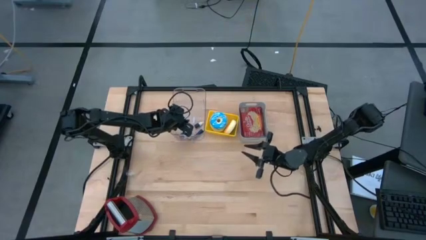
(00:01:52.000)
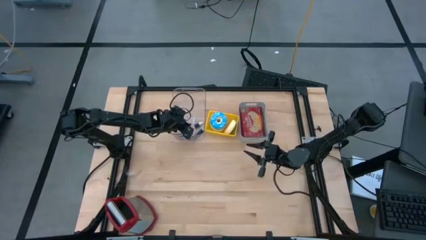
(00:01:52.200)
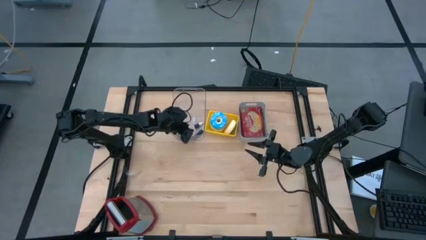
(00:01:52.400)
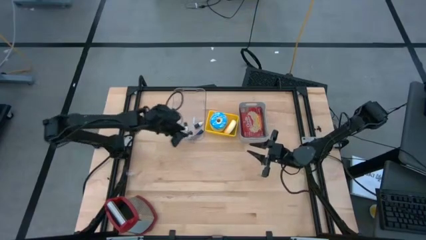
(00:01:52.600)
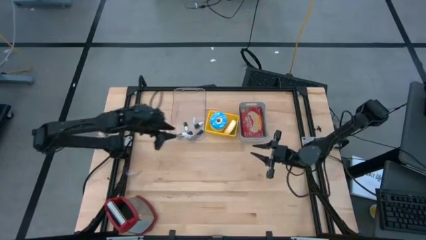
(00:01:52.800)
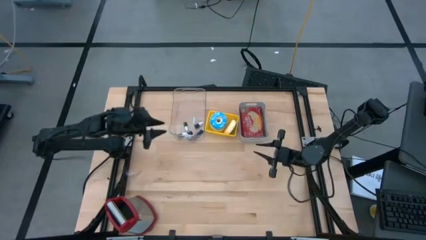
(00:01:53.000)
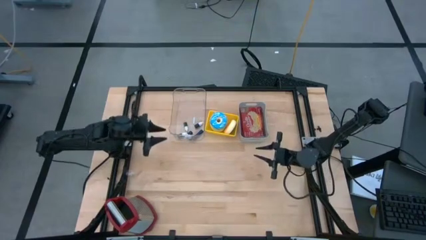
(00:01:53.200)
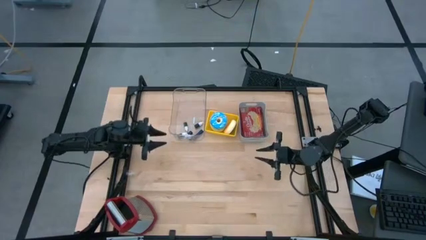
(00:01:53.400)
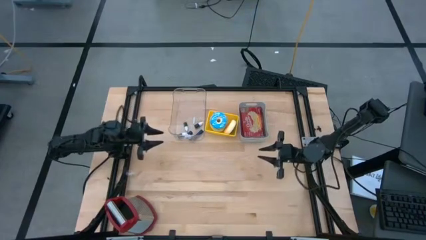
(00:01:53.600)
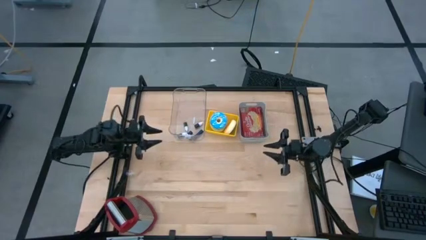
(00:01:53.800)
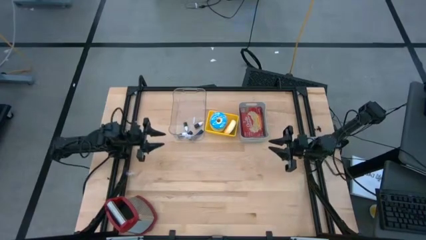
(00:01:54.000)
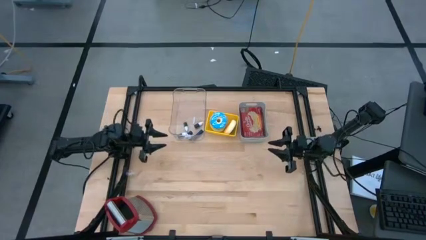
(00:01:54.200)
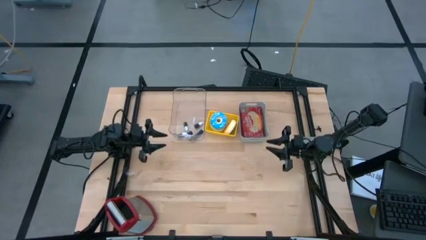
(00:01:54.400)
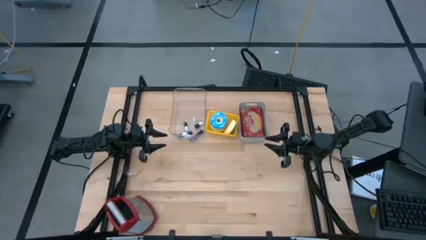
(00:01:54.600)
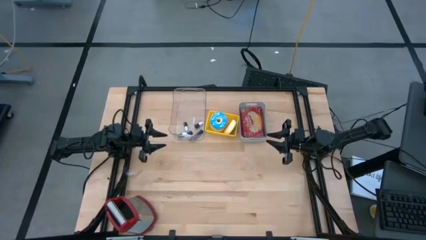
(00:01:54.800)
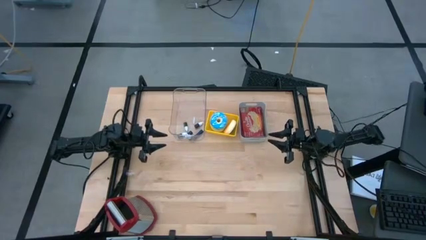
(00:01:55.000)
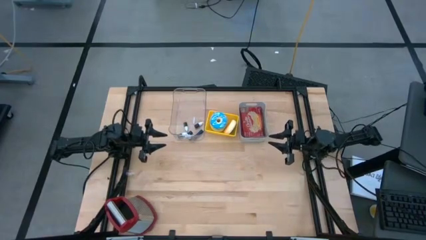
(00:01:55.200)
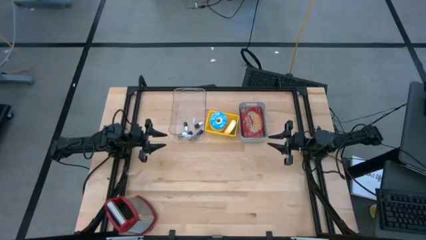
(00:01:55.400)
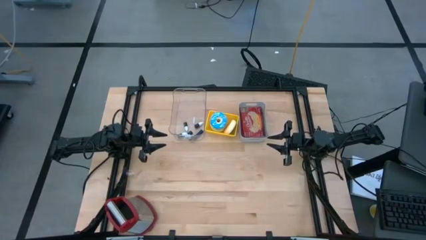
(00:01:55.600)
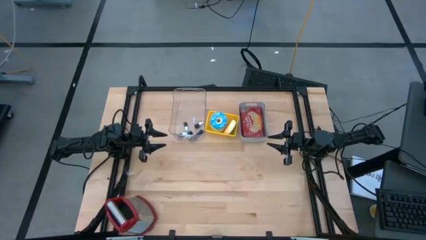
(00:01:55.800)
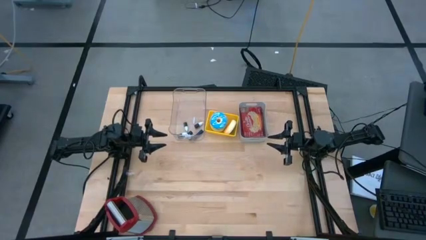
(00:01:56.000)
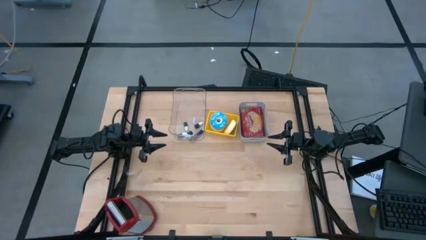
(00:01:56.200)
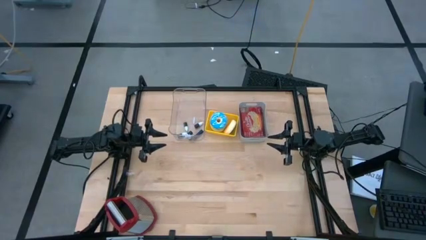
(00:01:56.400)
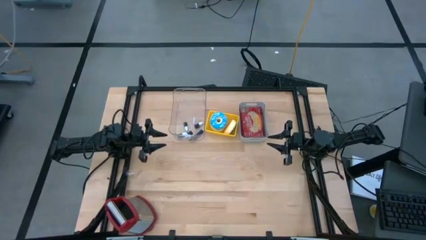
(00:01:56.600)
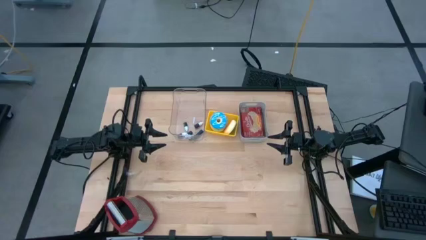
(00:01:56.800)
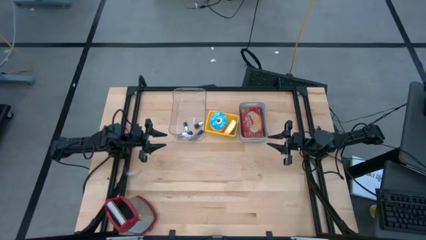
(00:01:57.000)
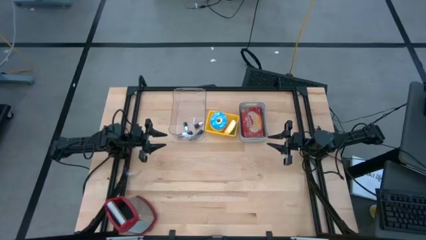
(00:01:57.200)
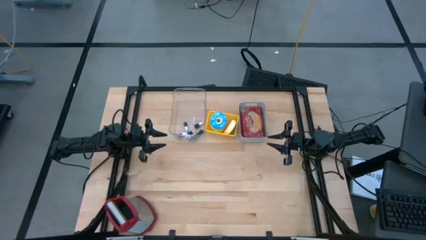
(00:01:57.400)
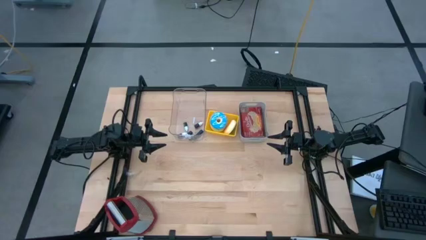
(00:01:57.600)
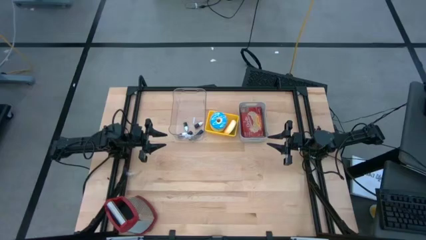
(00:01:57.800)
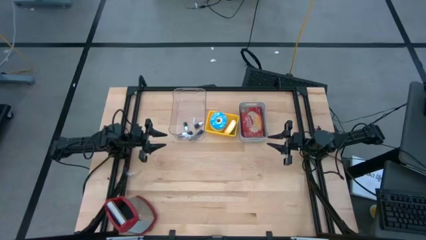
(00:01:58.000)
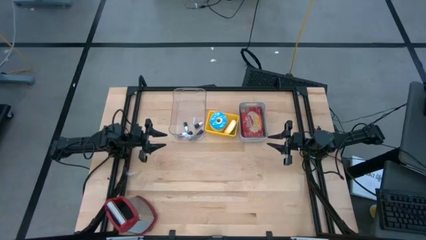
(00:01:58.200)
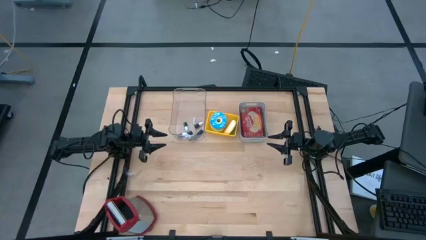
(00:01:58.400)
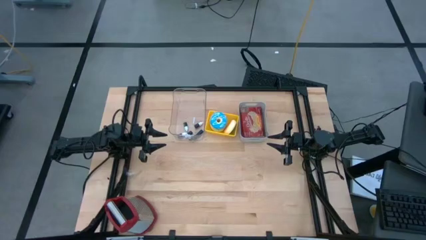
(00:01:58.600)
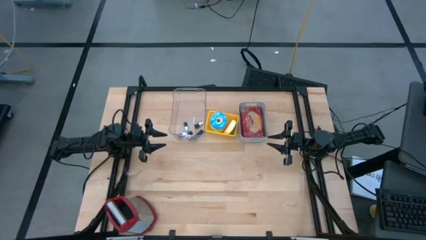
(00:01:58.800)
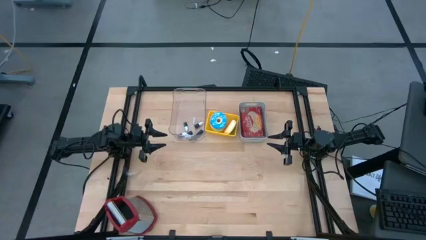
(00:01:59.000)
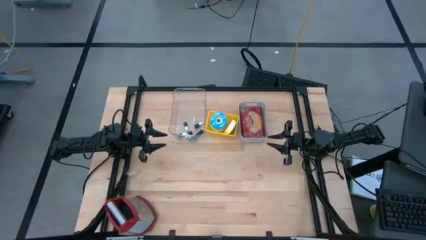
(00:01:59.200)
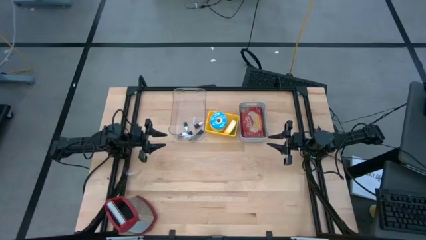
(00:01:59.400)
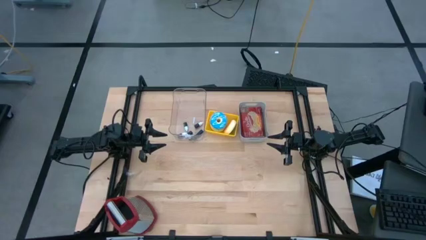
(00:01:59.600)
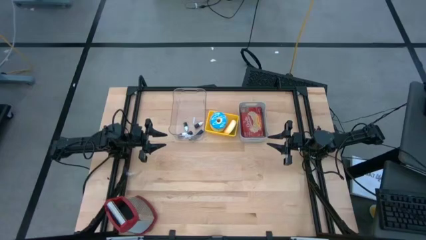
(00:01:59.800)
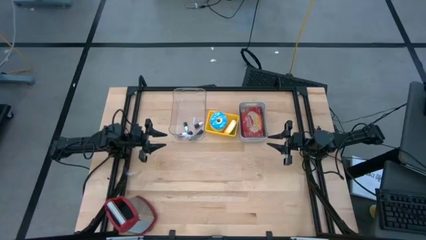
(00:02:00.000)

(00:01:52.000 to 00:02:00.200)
Return to Home Position

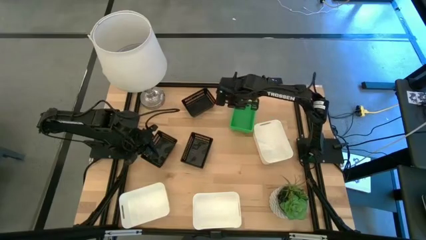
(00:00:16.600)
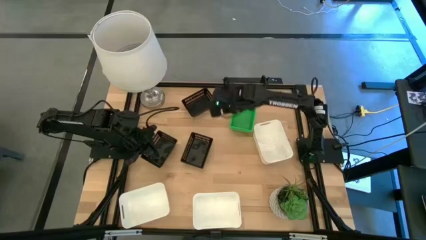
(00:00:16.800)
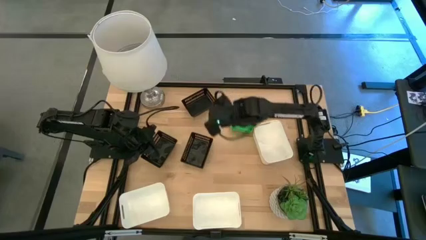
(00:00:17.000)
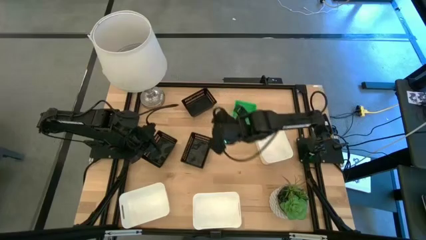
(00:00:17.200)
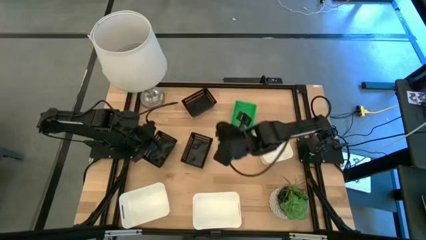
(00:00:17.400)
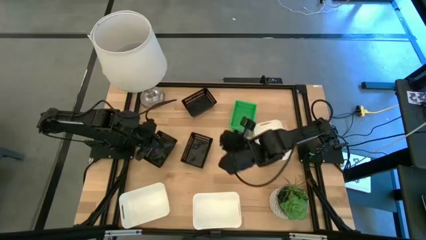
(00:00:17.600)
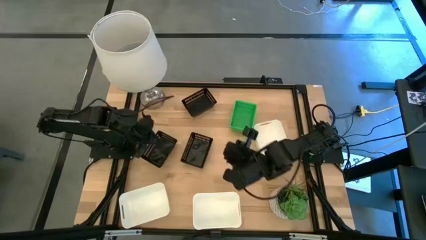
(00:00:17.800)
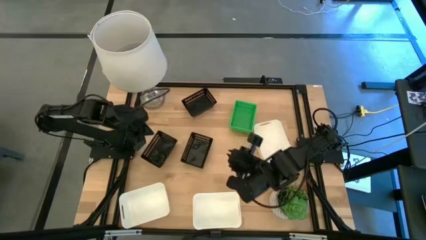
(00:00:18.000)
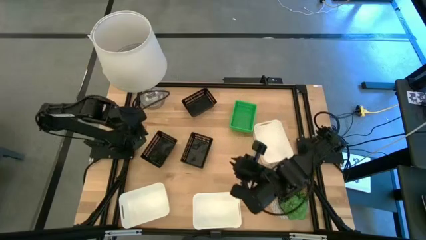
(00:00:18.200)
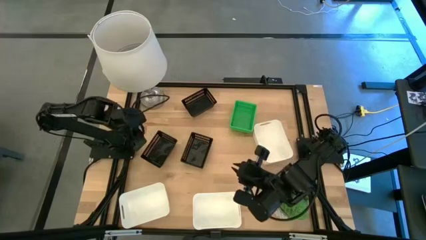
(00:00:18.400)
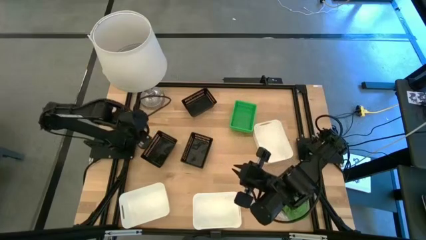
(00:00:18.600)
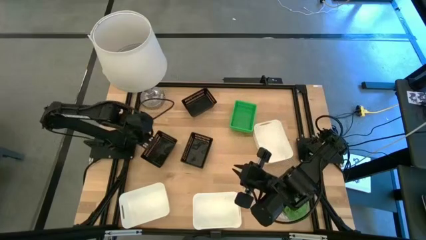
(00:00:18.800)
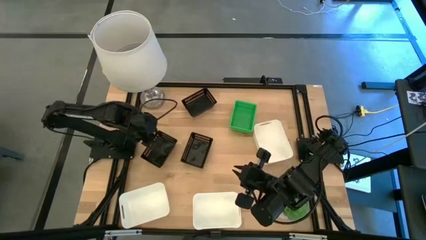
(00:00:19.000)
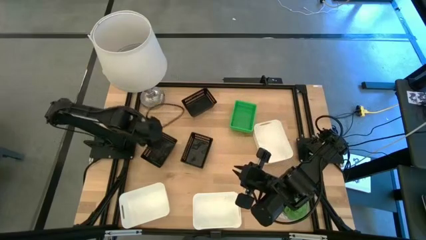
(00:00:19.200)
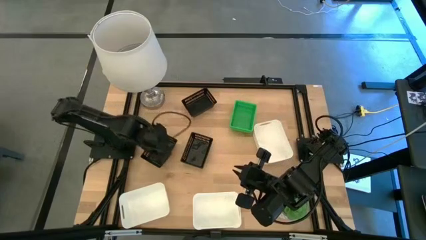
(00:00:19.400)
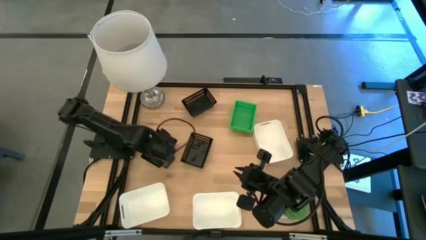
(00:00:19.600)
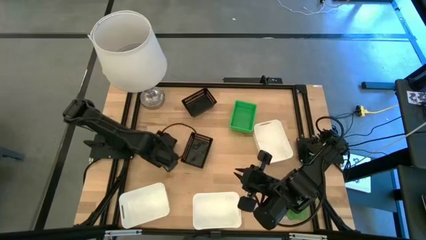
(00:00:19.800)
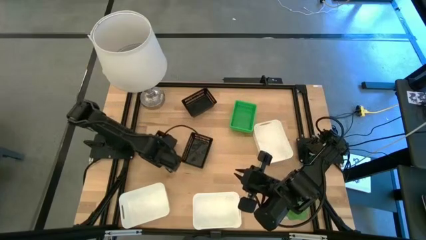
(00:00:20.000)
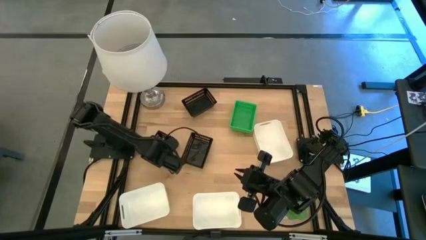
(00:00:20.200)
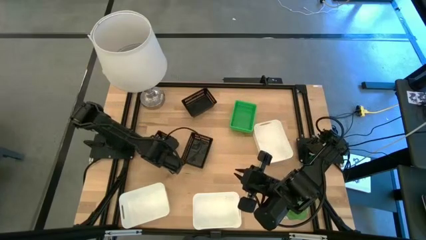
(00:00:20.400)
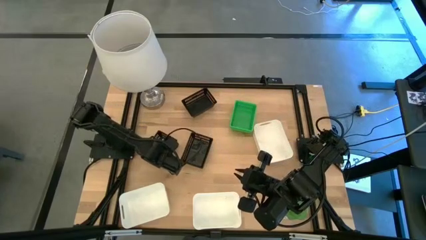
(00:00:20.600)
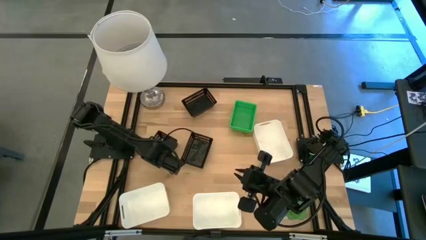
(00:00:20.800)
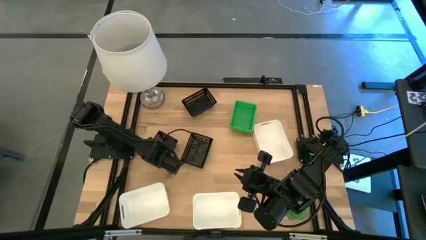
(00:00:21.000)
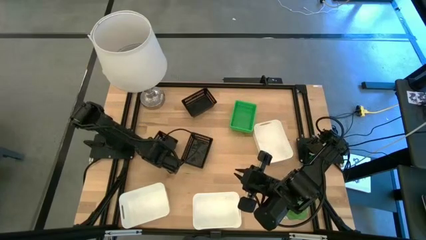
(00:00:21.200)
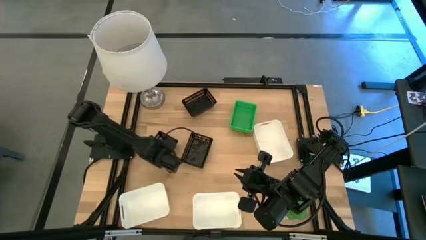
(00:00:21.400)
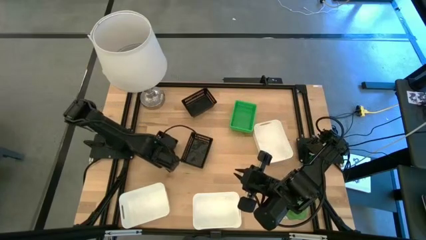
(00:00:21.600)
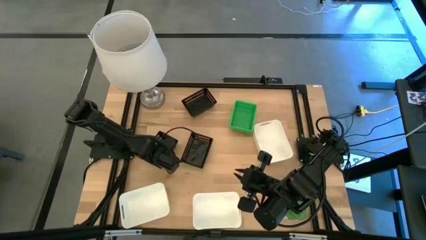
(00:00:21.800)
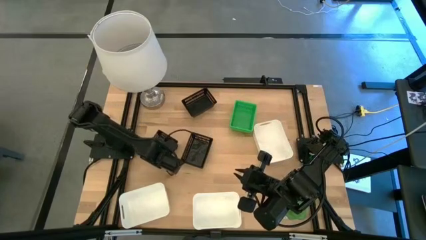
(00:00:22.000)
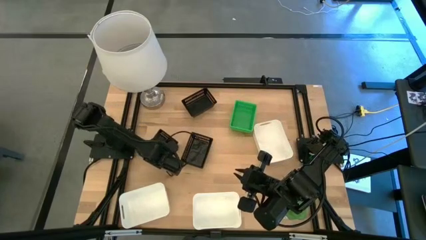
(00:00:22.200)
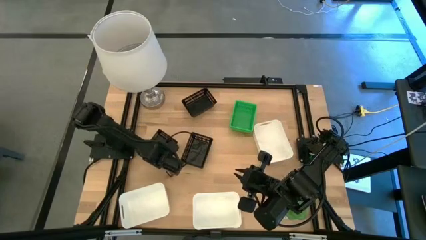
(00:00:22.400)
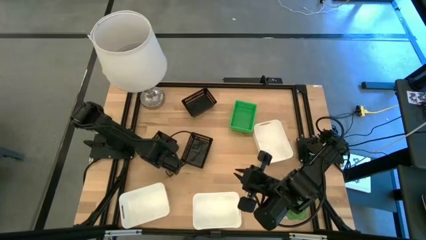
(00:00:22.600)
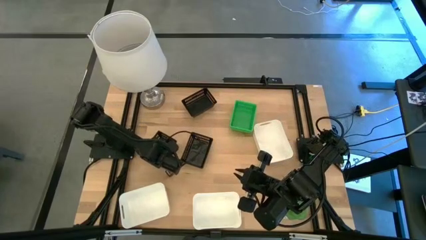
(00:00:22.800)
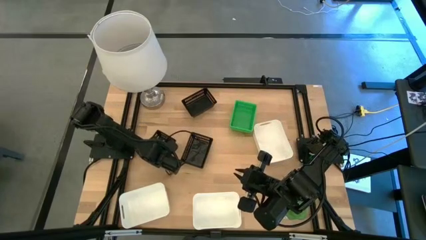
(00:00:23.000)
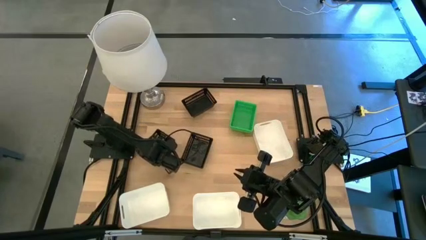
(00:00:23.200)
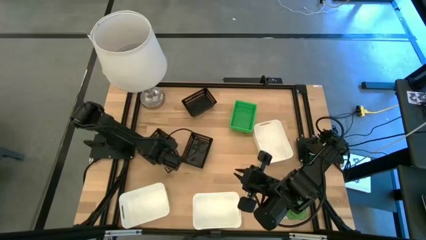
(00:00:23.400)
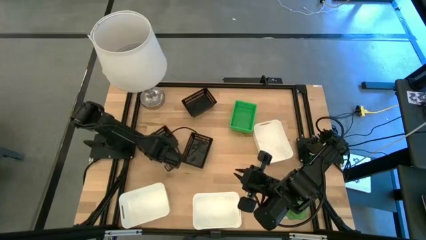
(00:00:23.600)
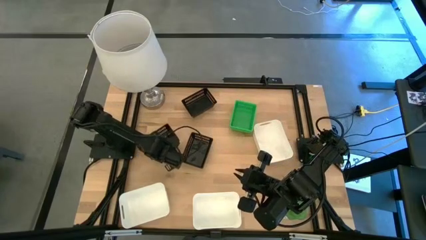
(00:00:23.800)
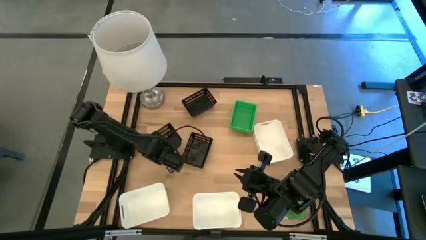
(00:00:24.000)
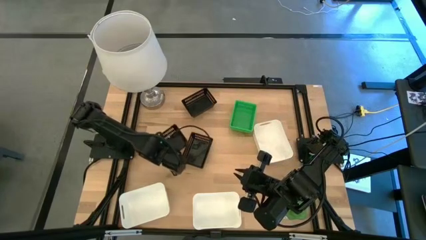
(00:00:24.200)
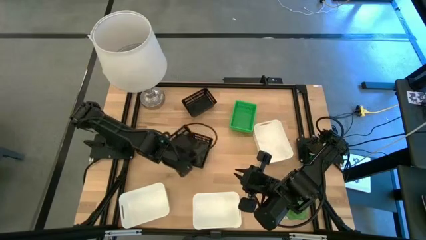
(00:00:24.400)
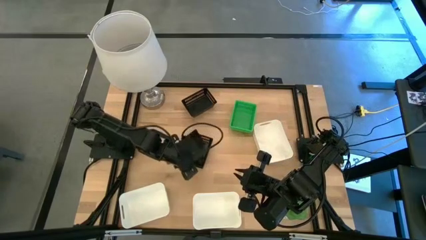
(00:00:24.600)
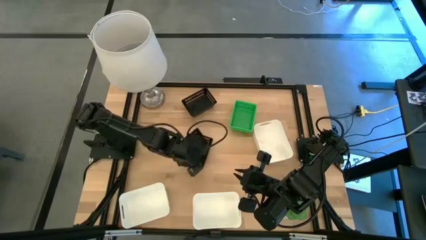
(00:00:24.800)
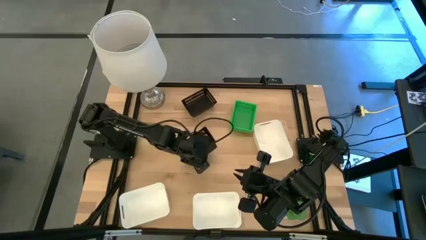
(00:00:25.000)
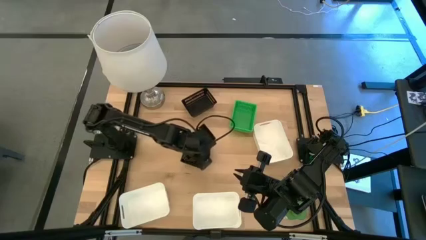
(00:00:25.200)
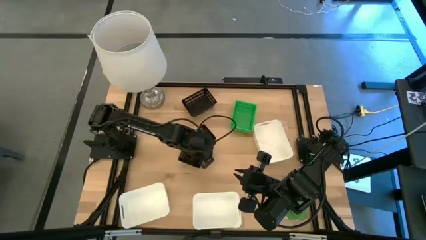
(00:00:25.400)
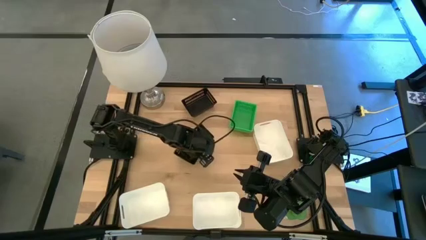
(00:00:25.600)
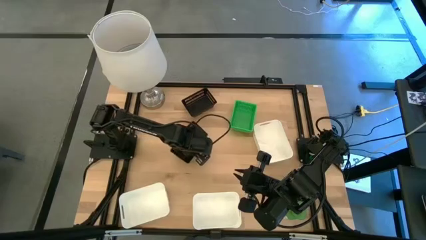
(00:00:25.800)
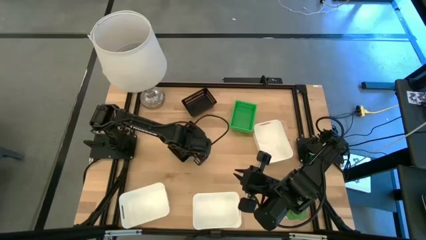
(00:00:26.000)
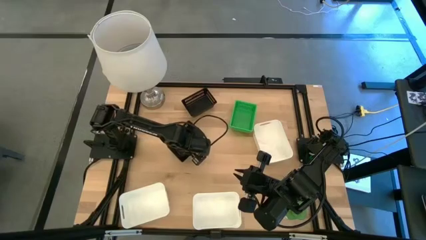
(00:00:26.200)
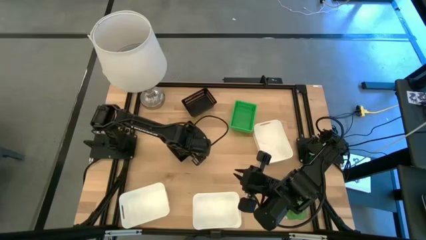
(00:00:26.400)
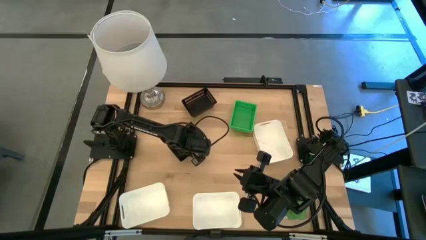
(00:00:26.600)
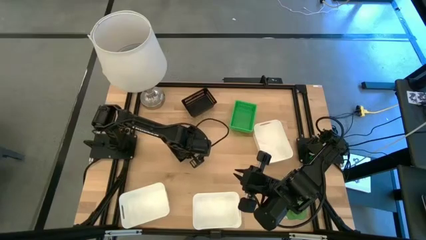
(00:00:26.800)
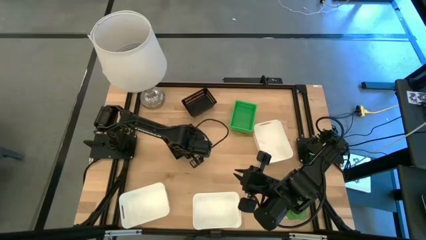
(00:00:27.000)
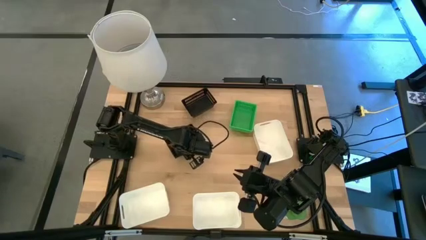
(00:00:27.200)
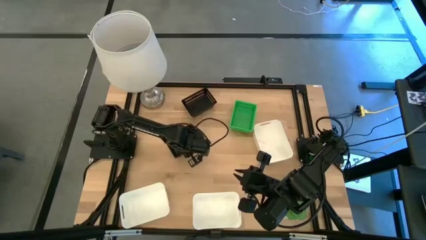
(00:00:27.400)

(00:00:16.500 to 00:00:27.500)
Stack the left black bin on top of the bottom right black bin
